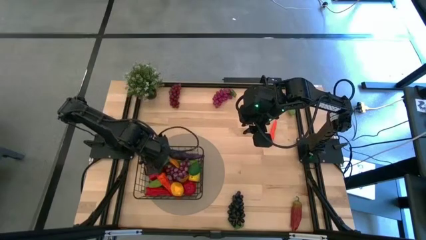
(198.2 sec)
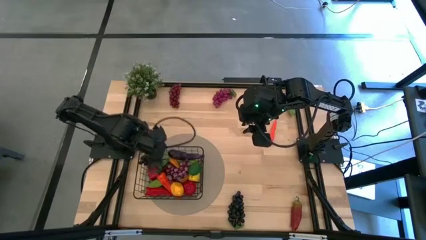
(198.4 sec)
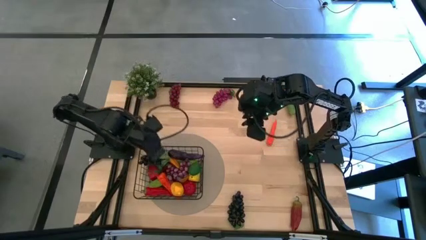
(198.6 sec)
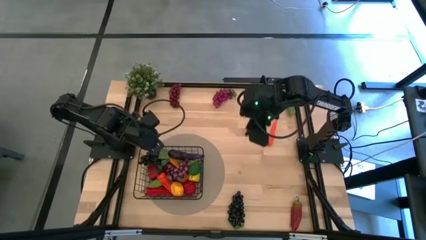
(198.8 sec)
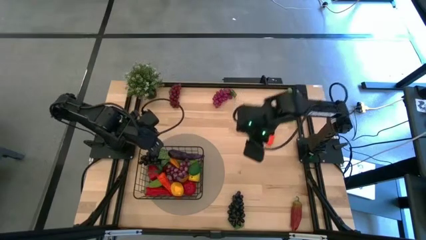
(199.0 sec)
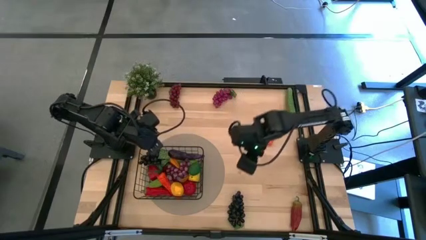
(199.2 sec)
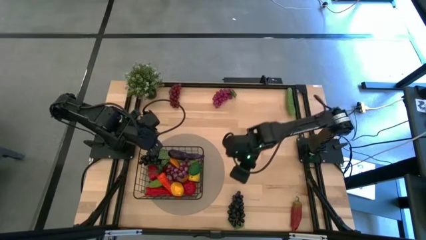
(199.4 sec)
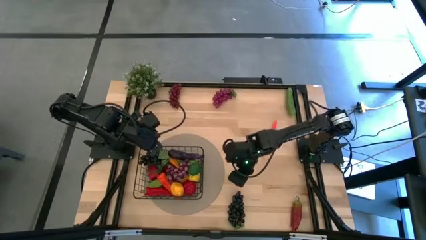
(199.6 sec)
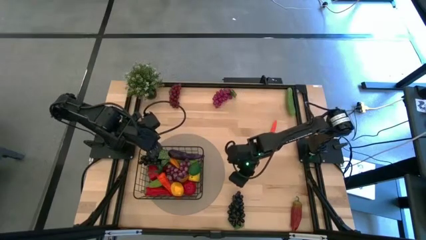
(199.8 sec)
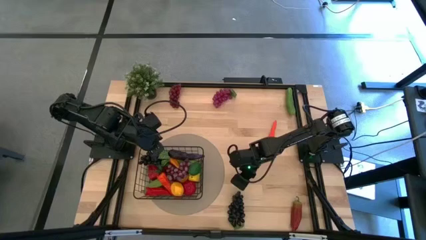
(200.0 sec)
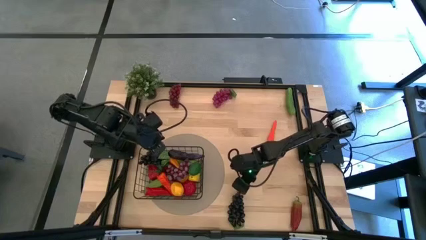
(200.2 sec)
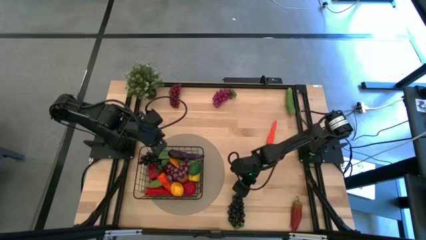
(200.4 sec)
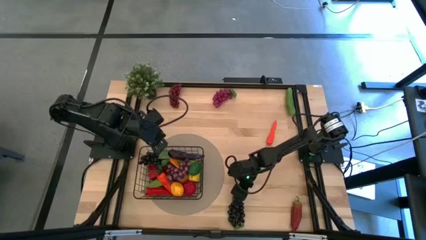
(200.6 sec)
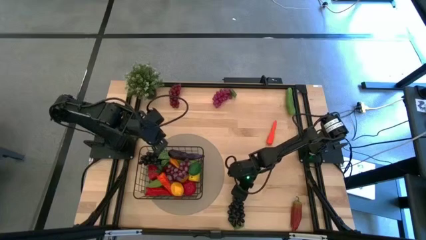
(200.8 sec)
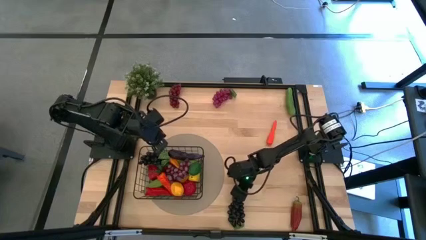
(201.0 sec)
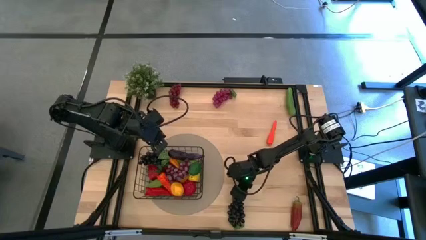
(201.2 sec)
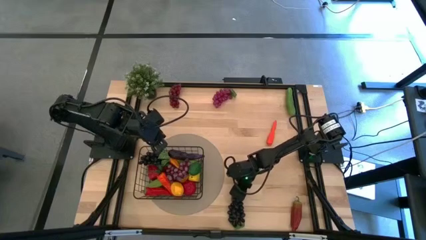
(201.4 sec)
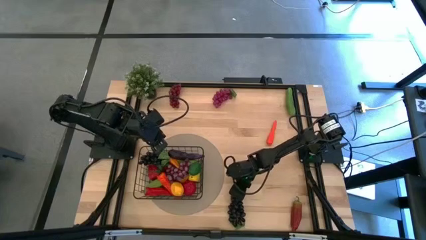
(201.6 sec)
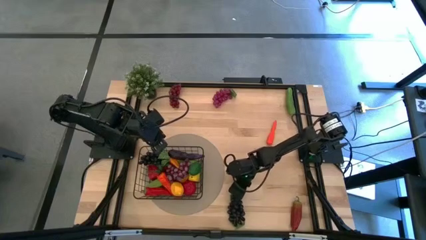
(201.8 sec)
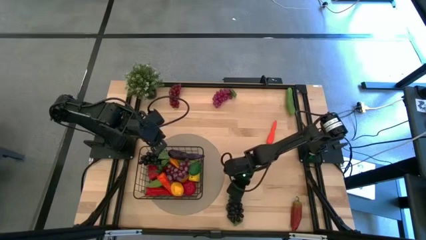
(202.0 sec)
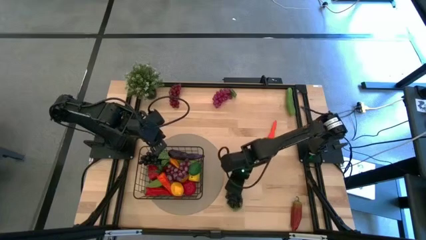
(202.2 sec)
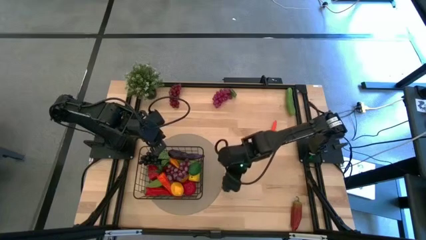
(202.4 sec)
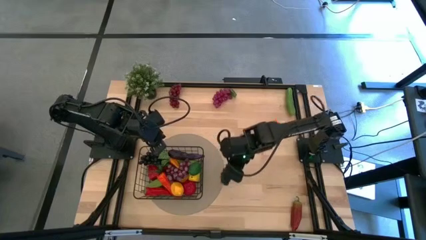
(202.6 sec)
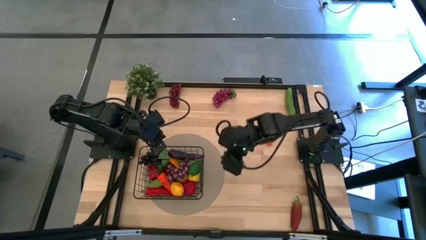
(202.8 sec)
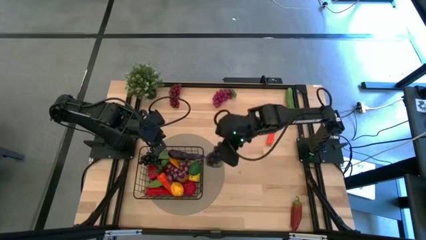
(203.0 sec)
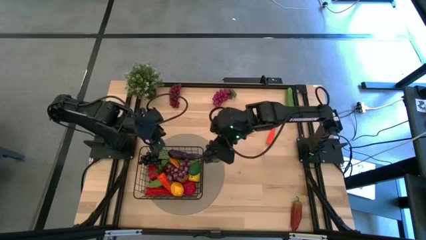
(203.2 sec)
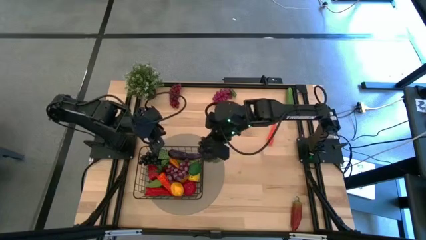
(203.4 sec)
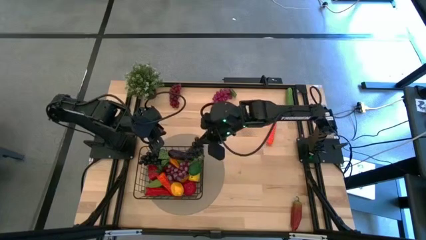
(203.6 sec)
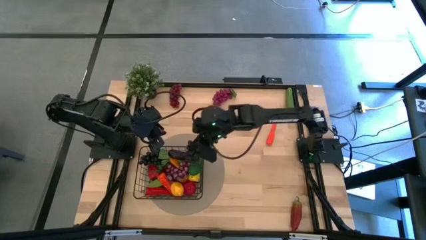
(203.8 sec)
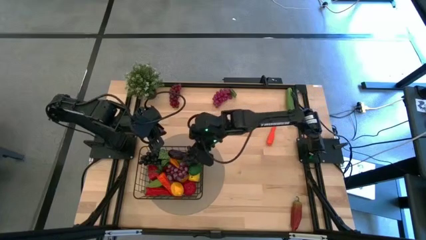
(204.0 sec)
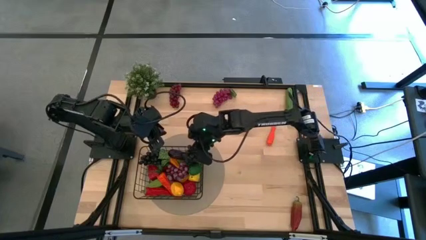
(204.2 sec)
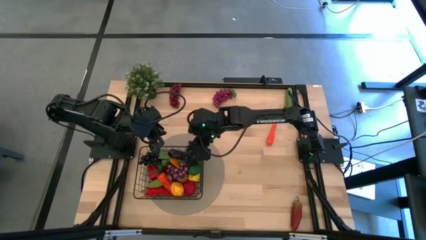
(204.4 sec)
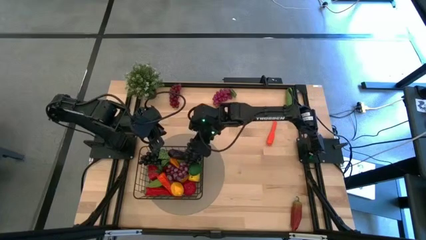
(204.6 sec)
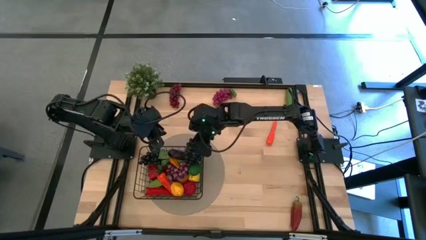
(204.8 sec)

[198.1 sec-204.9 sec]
Task: Build produce basket
Put the black grapes into the black wire basket

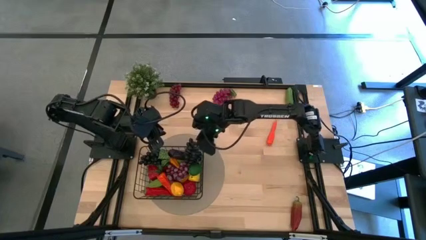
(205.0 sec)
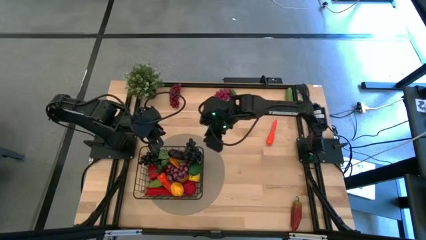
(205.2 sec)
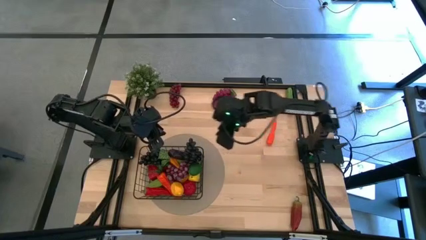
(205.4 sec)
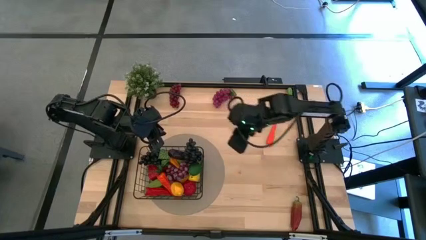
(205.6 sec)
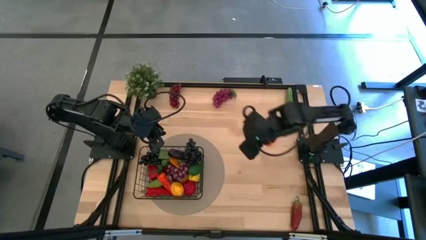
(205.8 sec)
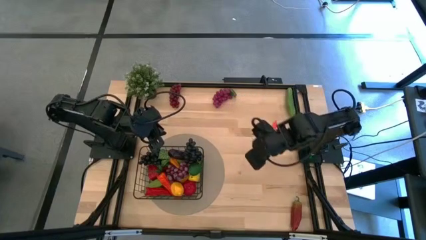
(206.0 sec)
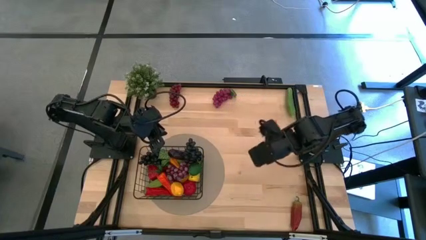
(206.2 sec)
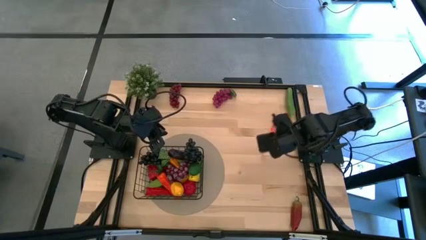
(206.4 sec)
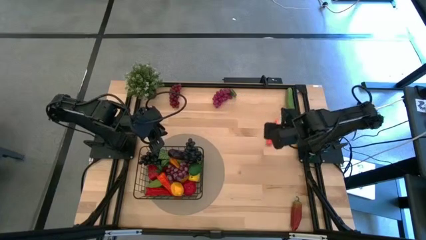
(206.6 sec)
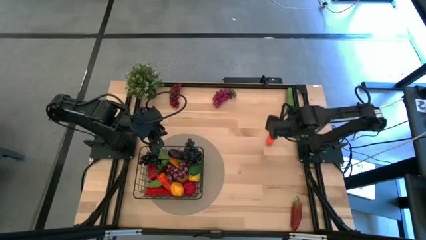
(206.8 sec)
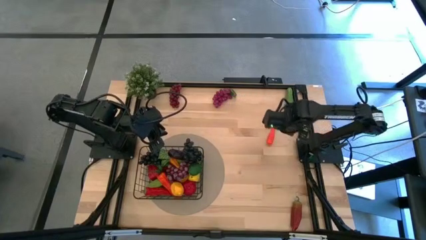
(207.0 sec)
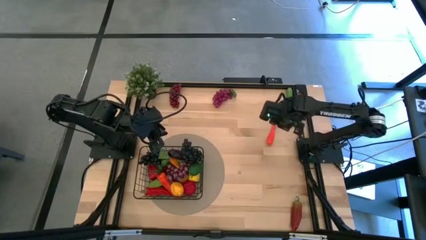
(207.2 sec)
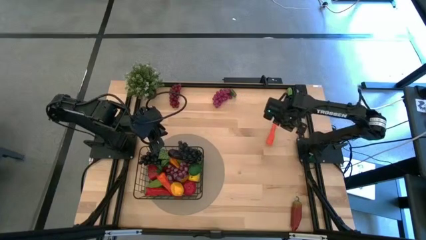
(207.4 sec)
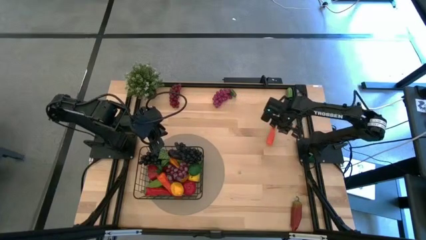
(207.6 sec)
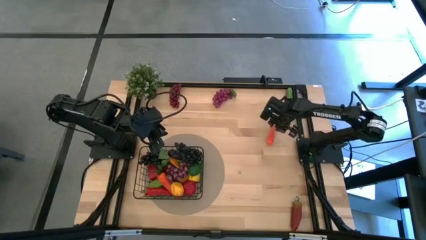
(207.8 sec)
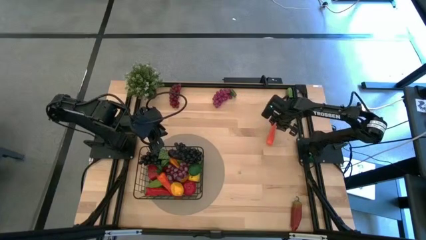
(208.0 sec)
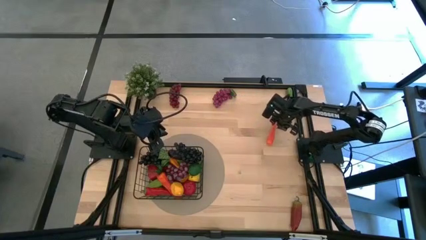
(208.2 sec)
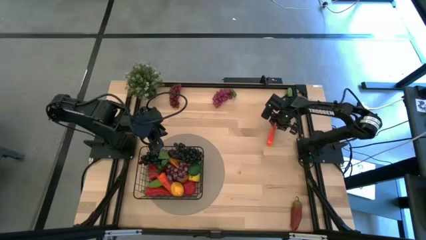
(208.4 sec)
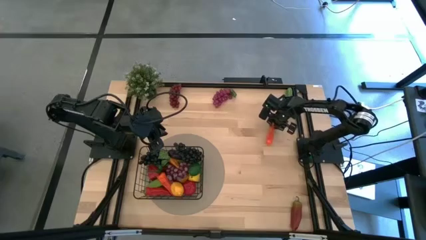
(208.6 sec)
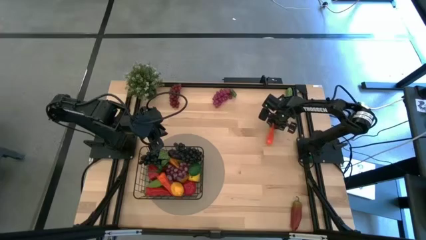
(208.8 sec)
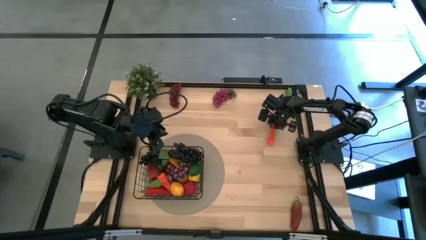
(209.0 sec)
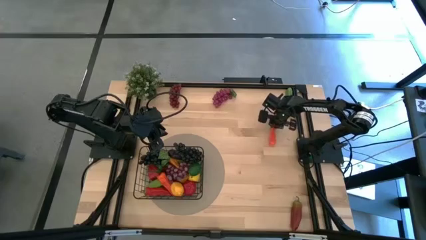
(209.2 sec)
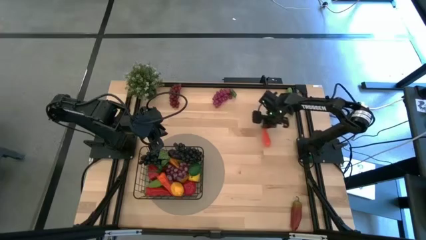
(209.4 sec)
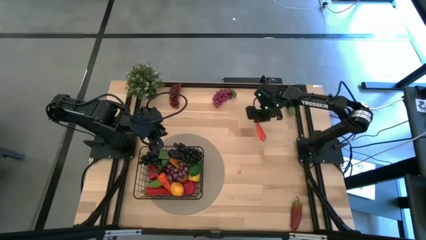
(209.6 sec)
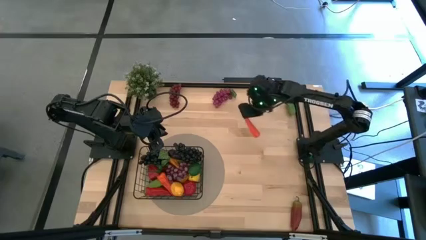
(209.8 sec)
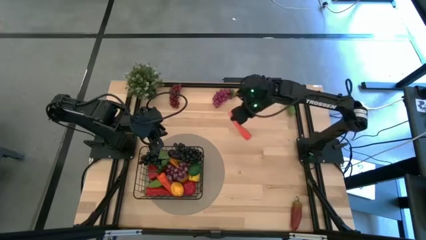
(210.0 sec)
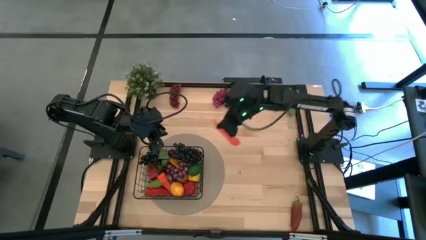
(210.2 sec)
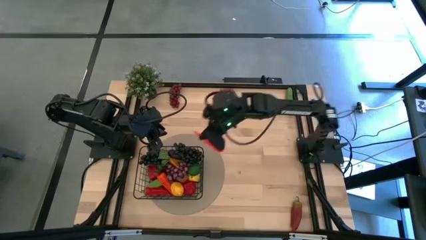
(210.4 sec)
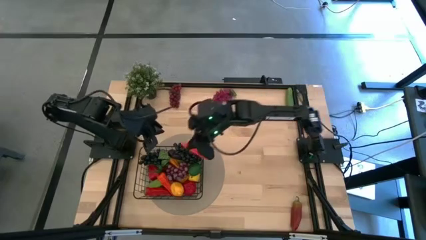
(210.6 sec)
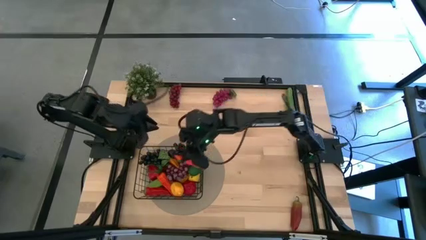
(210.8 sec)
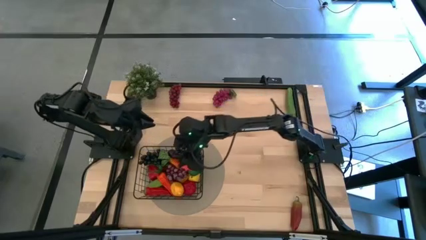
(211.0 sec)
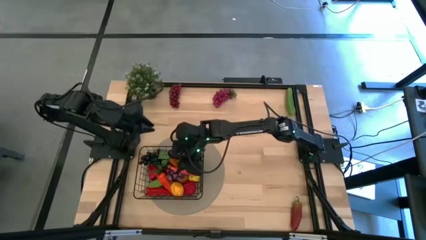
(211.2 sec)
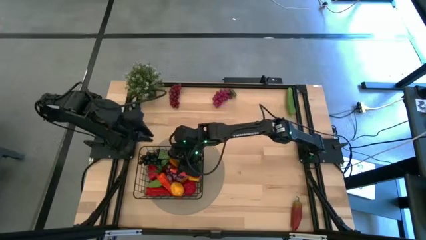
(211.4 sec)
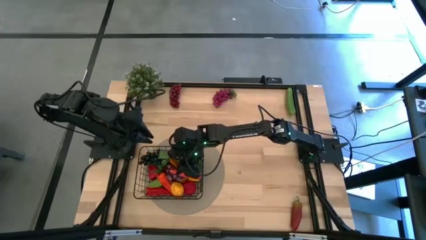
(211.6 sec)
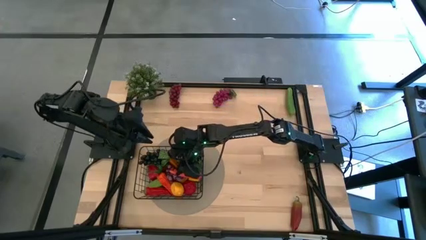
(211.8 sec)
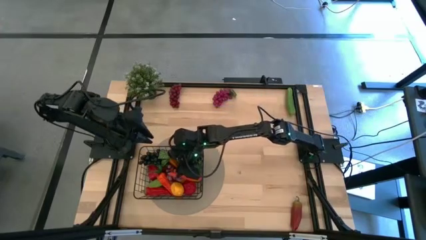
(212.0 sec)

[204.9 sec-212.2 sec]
Put the orange carrot into the black wire basket
